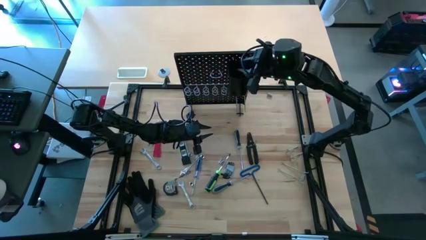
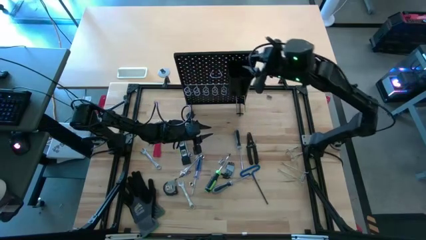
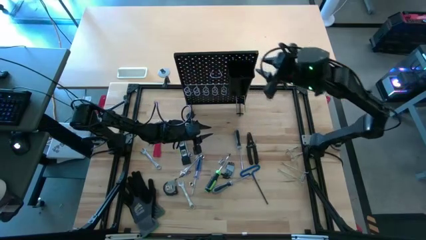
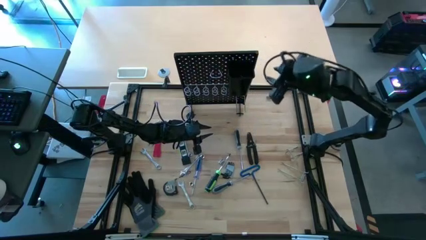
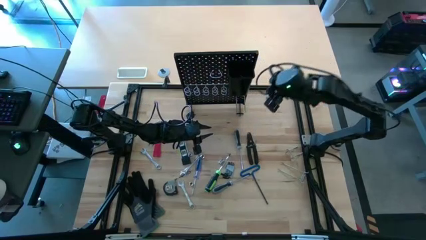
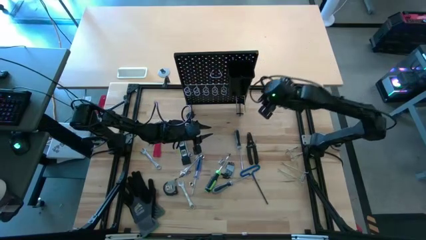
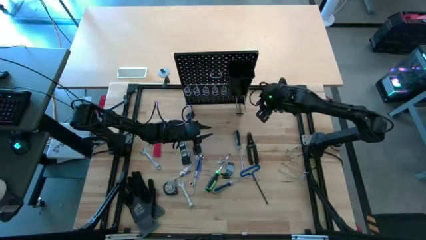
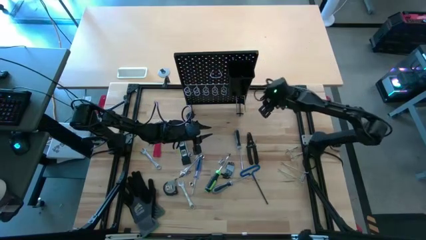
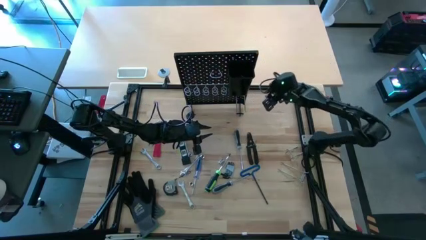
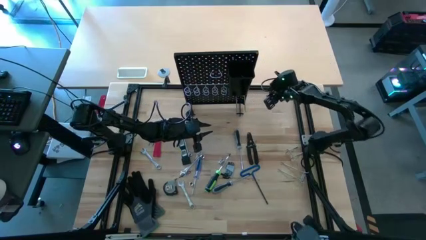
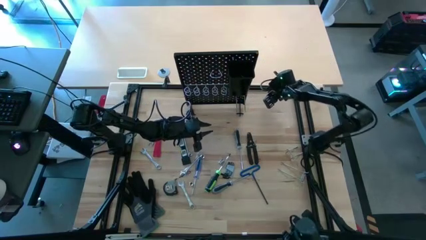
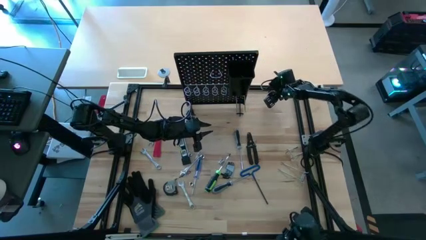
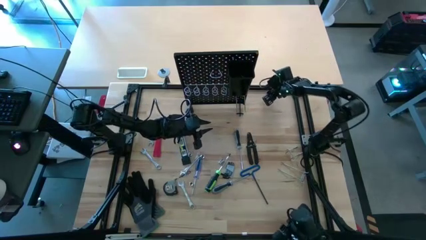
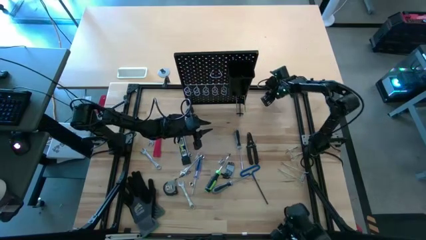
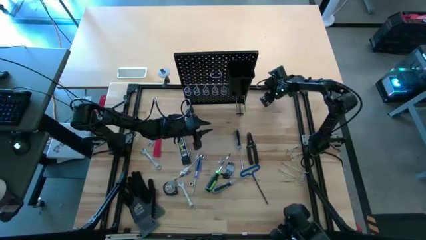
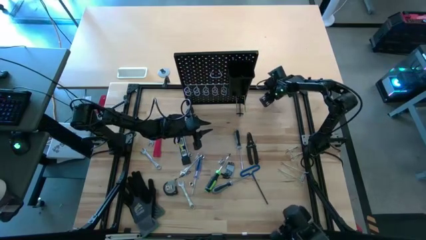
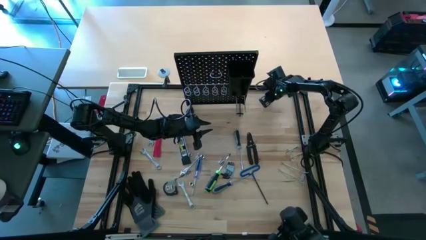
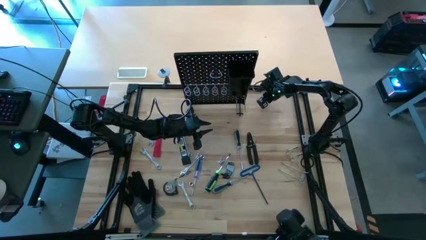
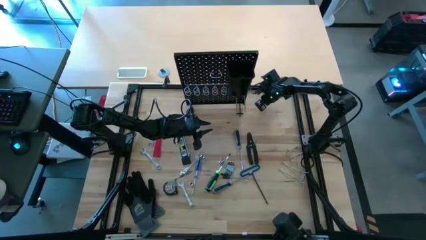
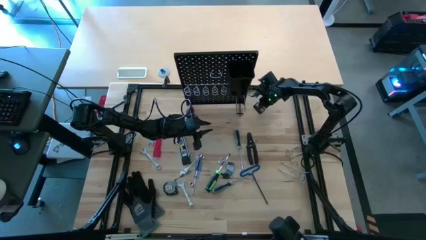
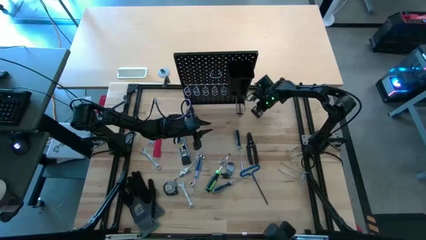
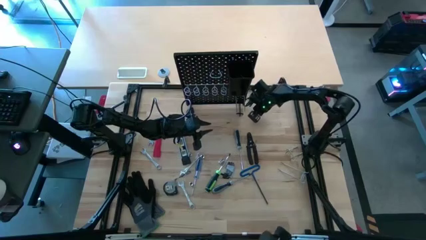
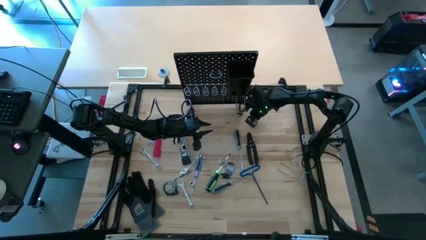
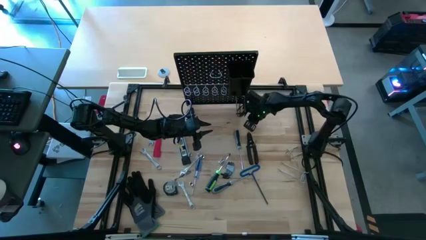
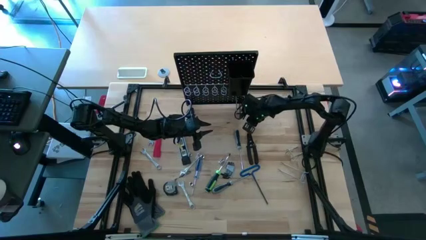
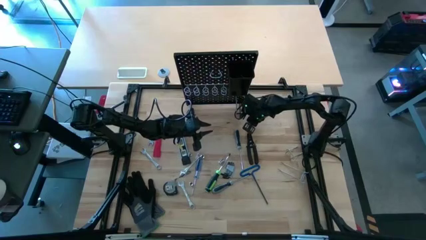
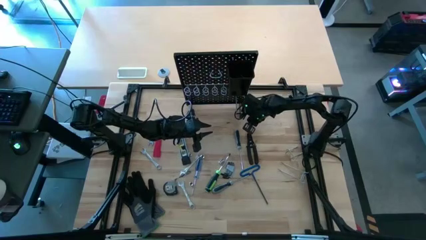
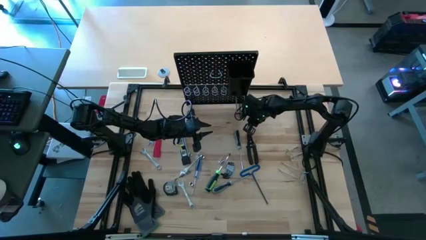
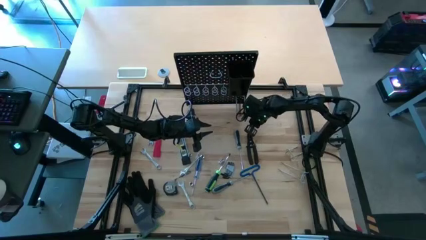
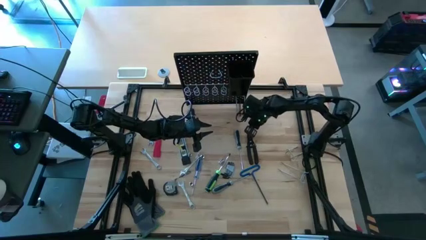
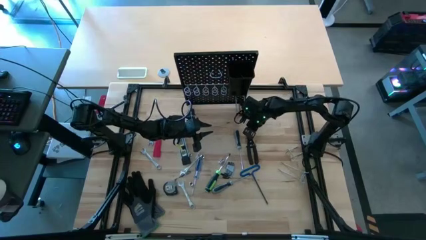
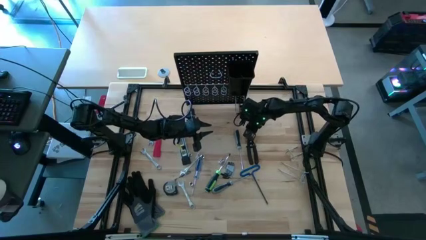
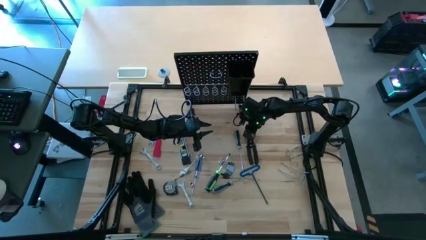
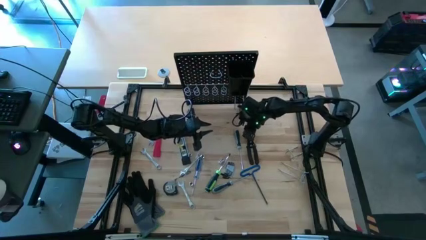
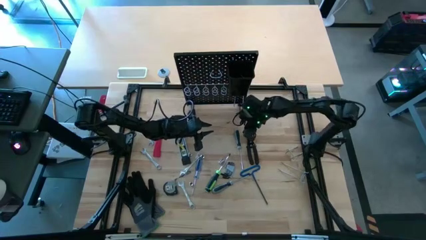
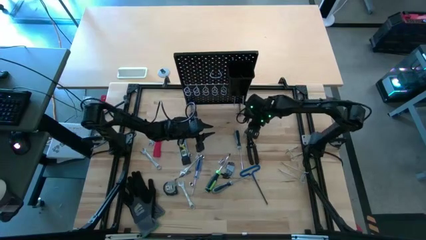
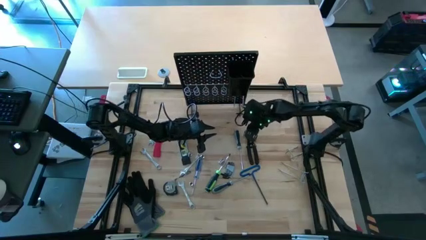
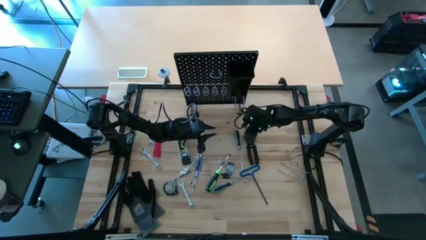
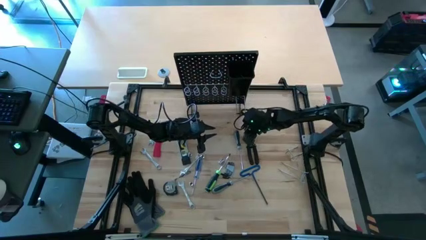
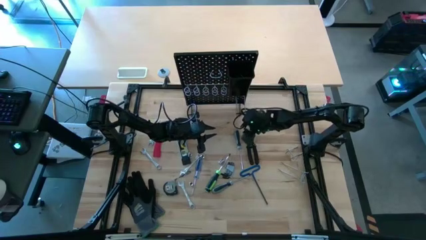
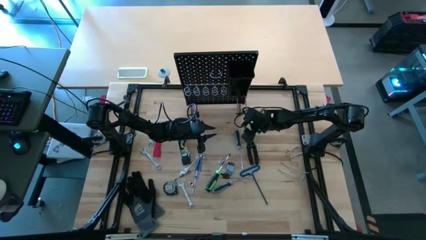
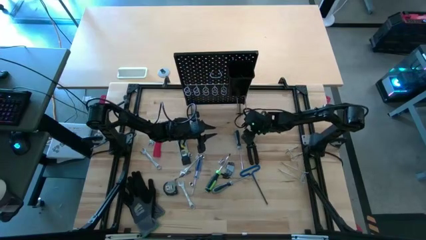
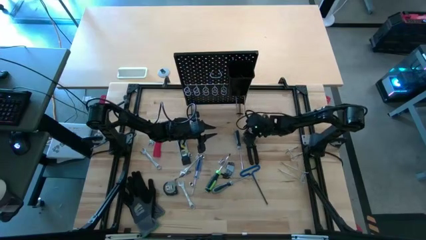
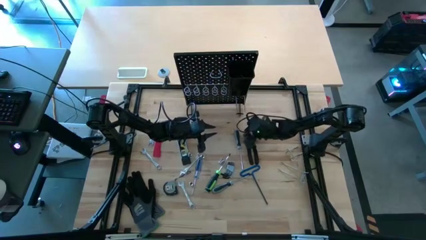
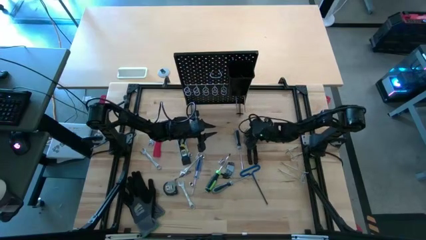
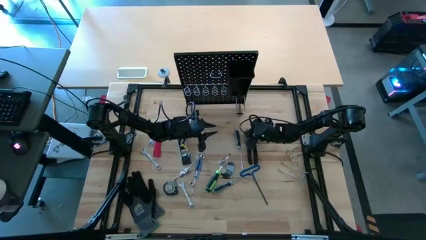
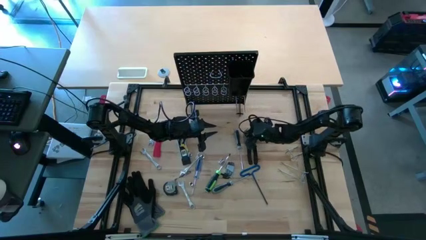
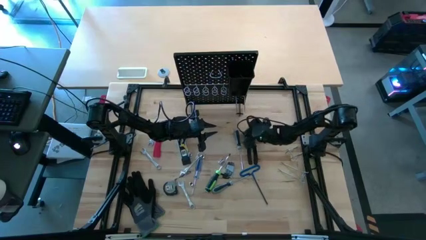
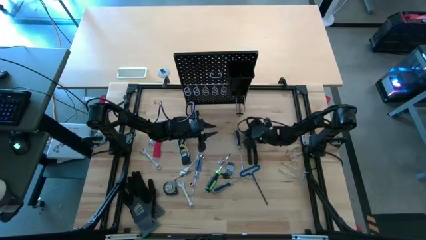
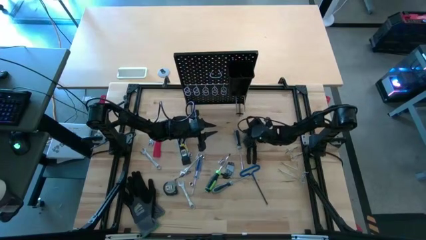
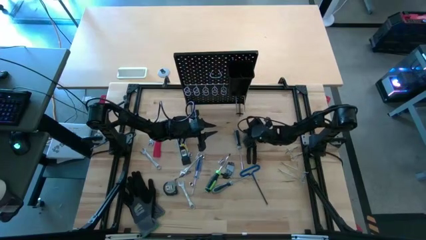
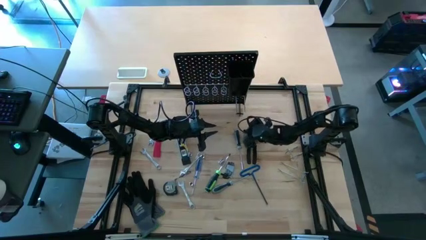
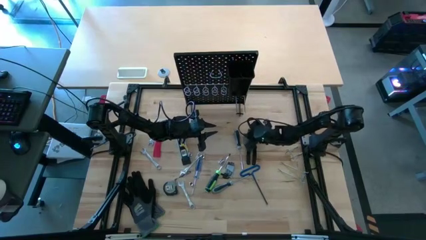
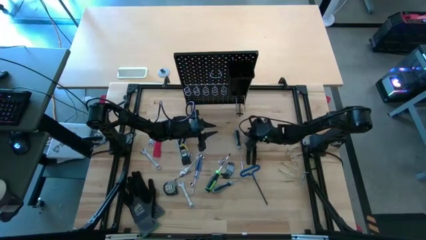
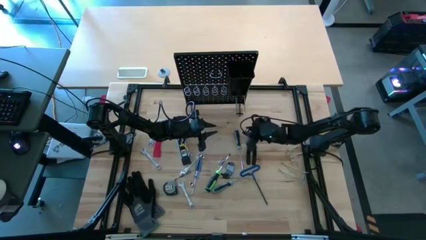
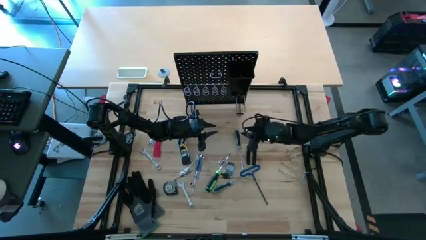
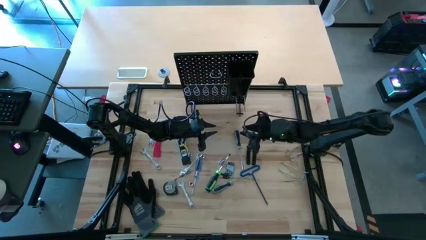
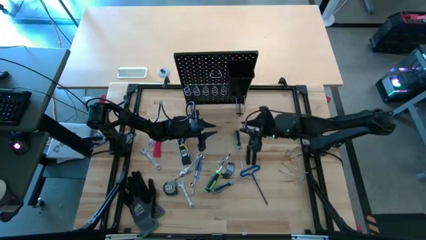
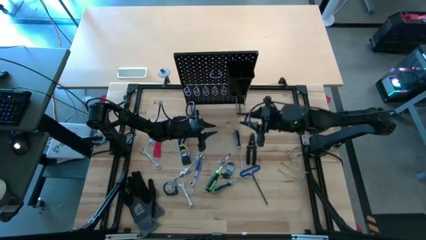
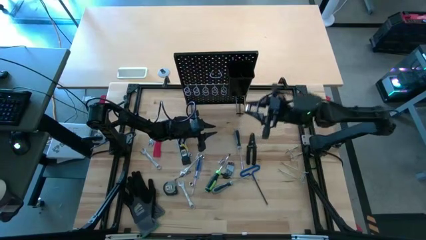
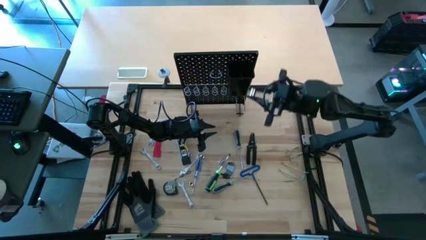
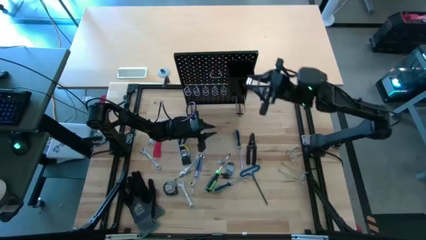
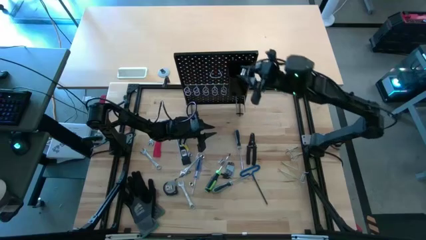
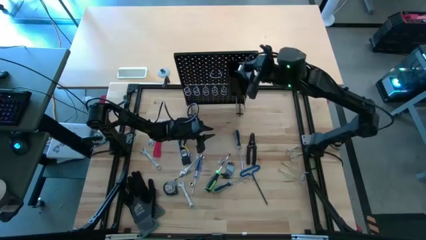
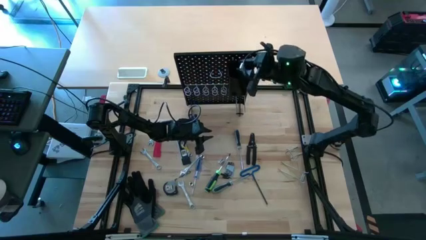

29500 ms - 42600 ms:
Task: Hang tools onto peg board
Put the socket wrench into the pegboard bin

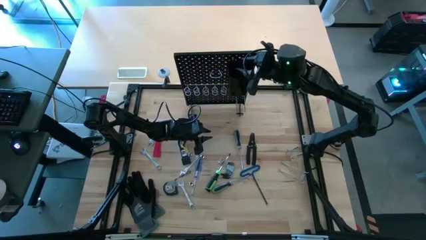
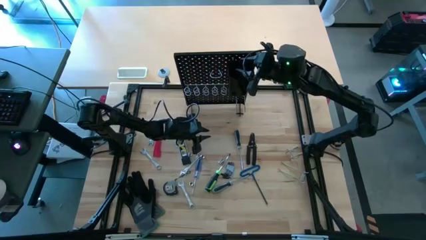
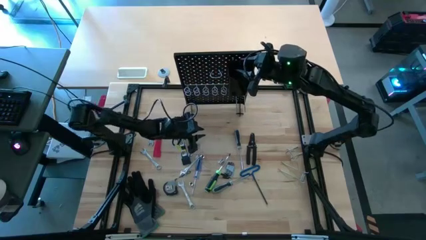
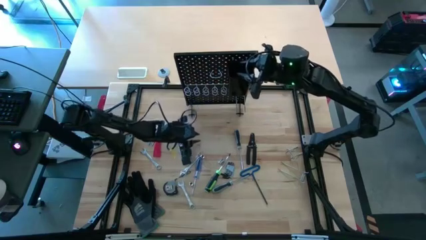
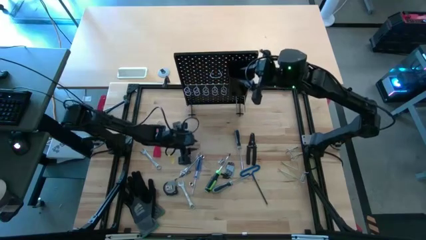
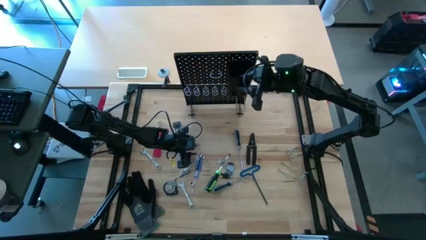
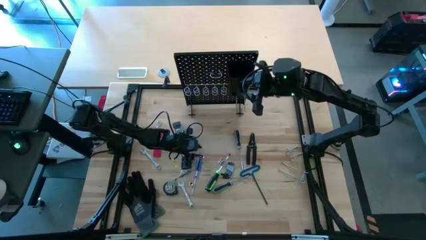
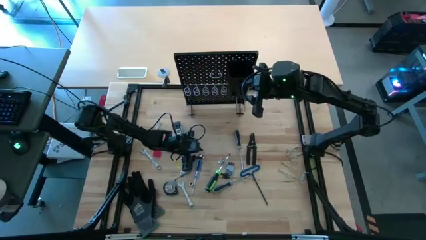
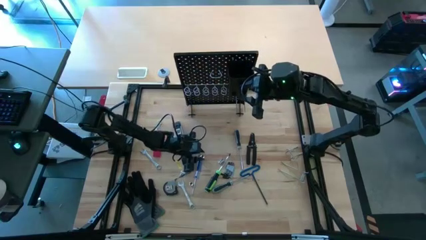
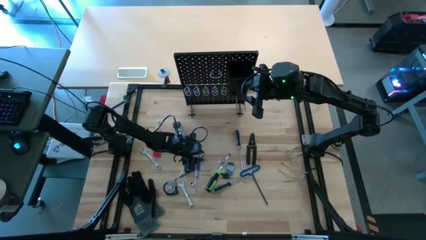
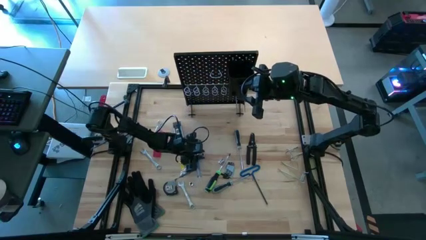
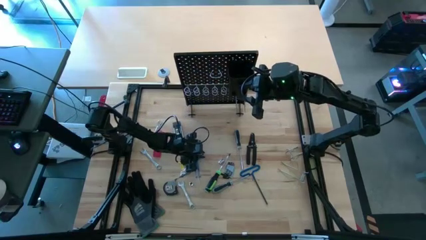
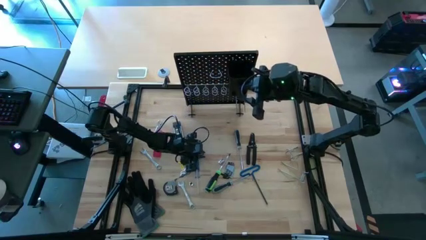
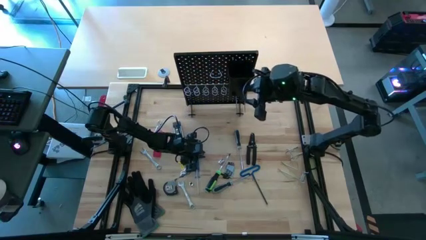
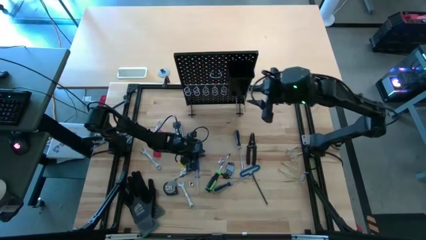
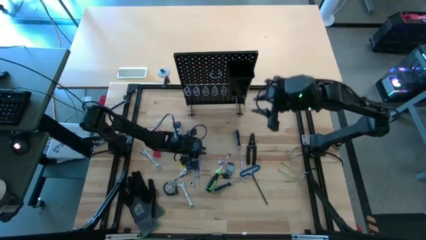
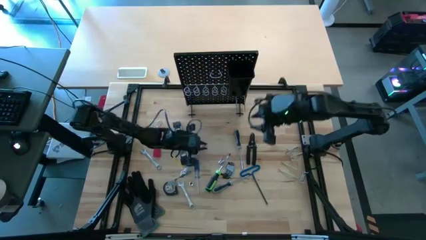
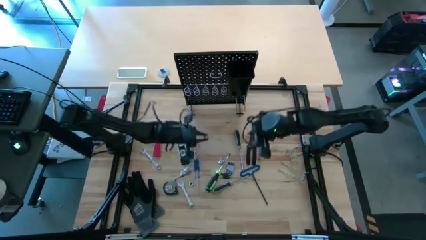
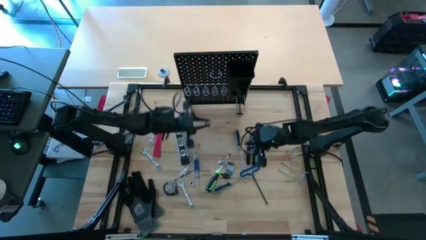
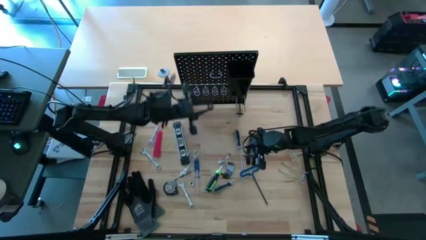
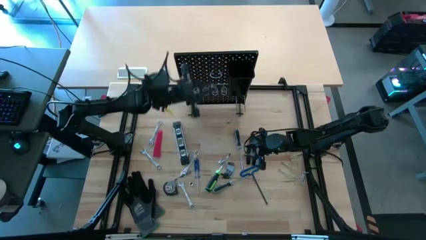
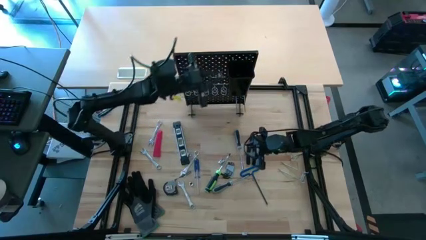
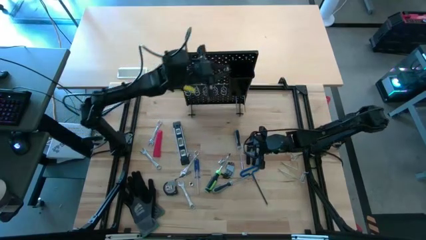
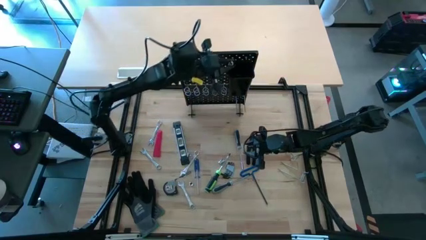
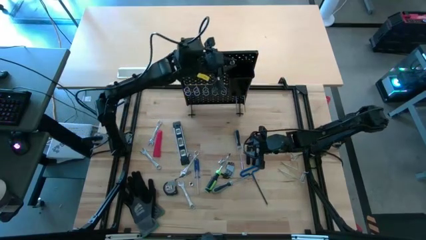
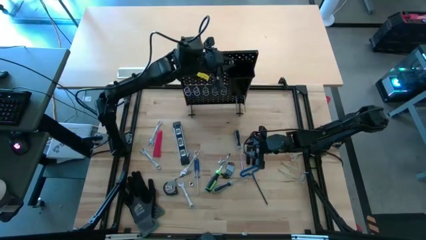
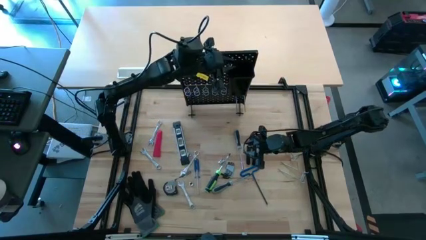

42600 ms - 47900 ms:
Put the socket wrench into the pegboard bin
